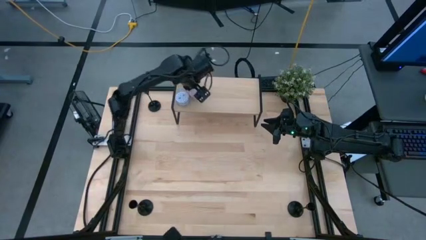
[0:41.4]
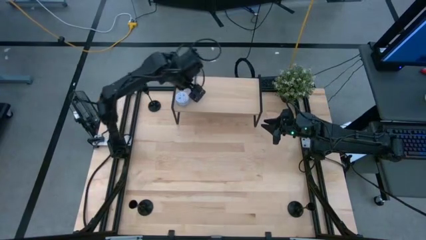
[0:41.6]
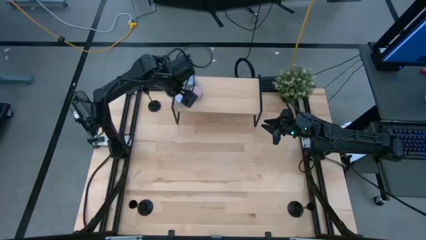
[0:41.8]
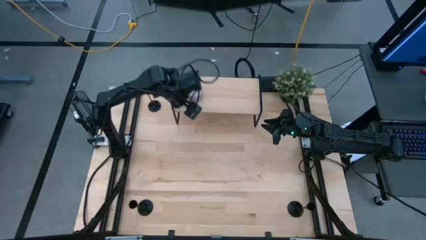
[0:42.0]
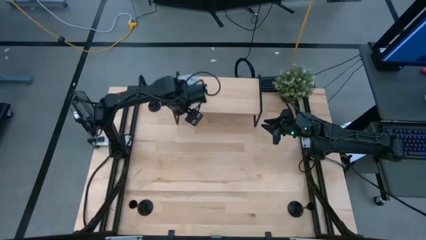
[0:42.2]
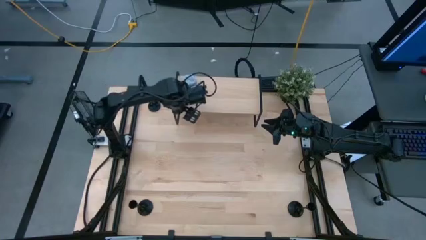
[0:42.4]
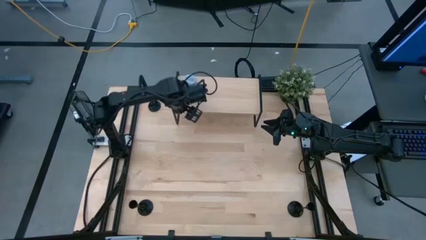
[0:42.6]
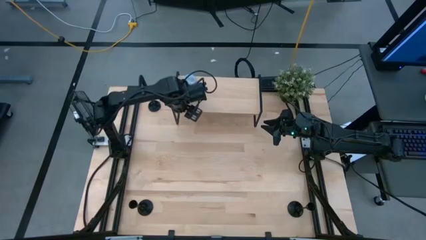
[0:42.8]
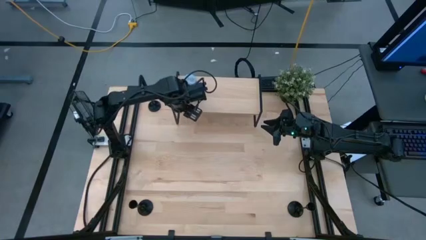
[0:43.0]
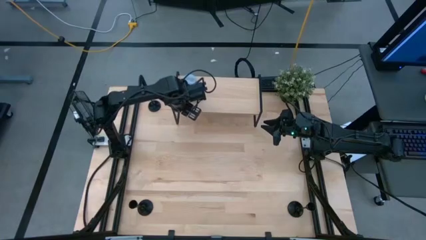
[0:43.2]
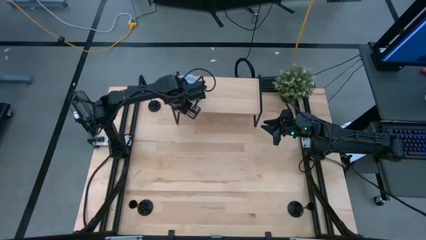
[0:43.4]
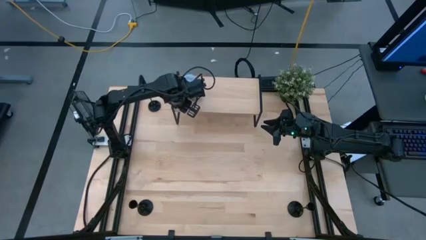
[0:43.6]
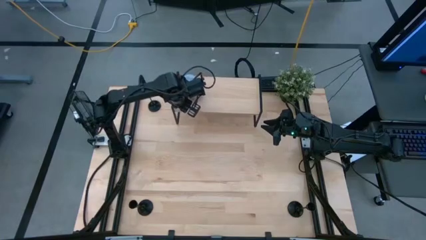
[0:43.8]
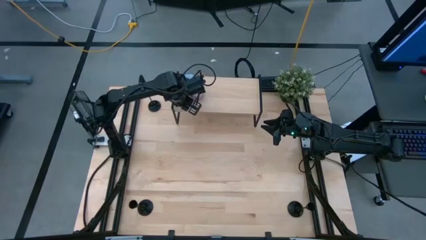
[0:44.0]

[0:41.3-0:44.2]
Task: Pick & Place candle stick holders
Adjust the white scented candle on the shelf

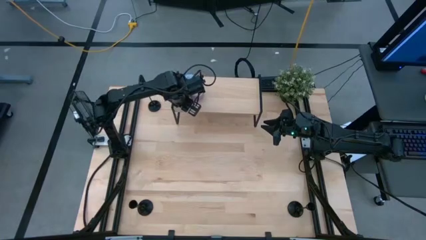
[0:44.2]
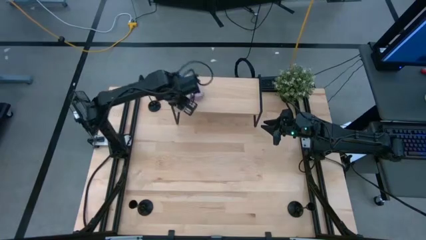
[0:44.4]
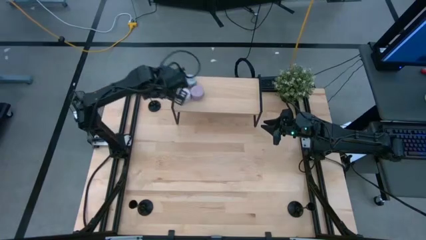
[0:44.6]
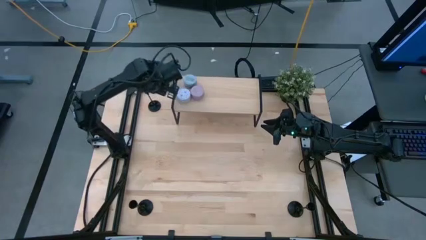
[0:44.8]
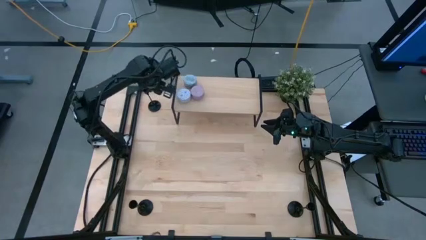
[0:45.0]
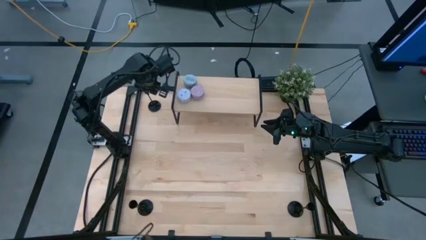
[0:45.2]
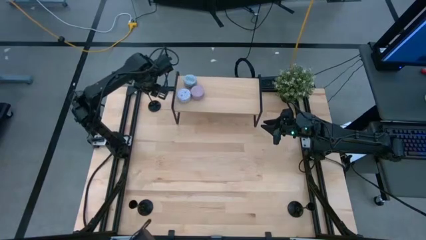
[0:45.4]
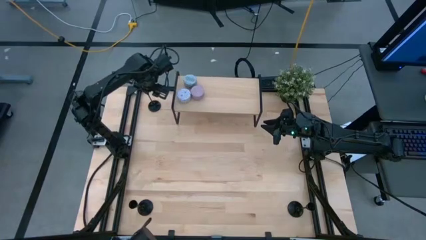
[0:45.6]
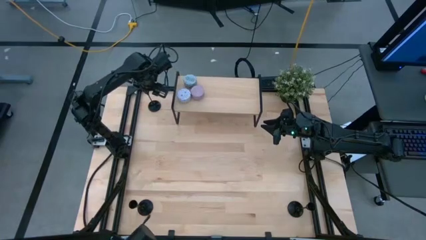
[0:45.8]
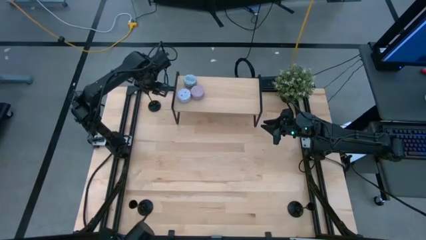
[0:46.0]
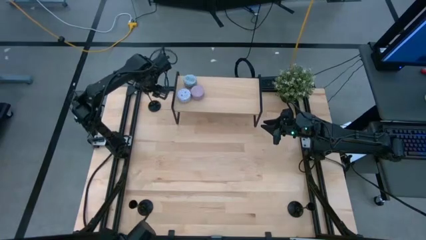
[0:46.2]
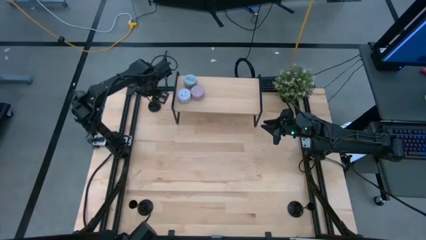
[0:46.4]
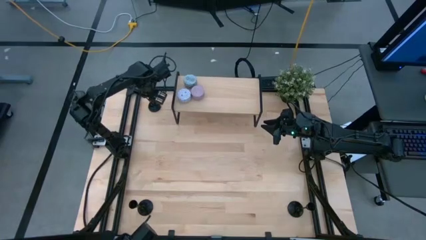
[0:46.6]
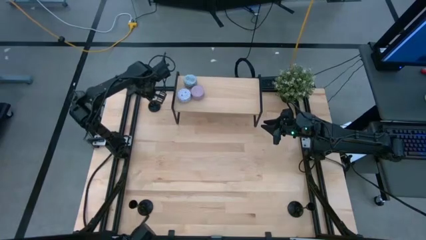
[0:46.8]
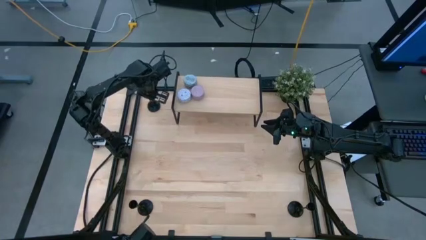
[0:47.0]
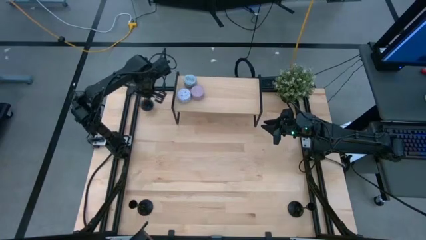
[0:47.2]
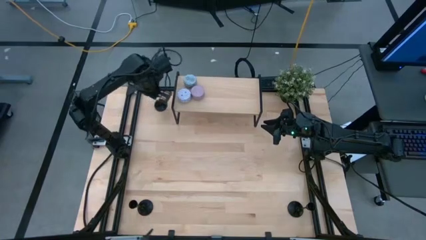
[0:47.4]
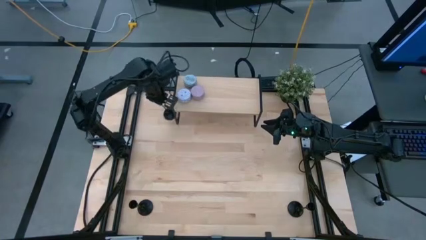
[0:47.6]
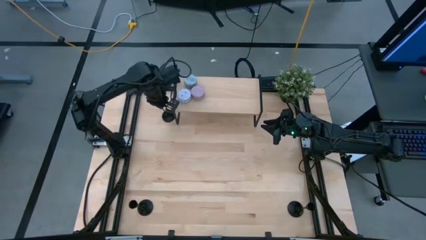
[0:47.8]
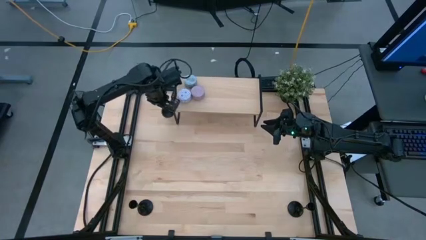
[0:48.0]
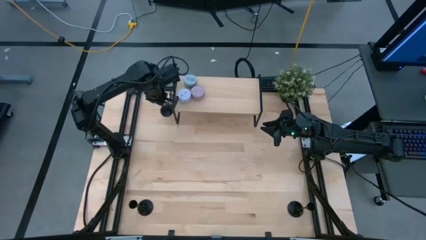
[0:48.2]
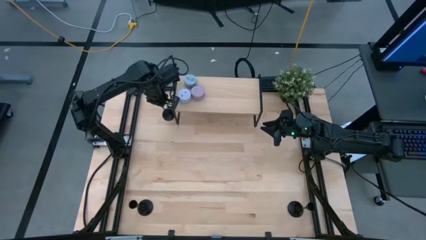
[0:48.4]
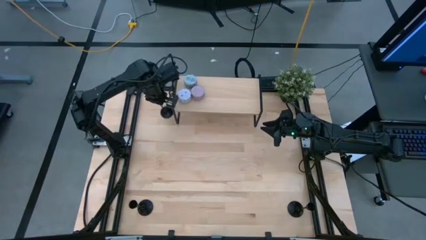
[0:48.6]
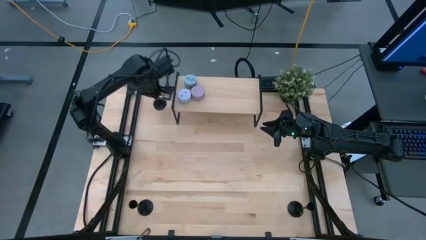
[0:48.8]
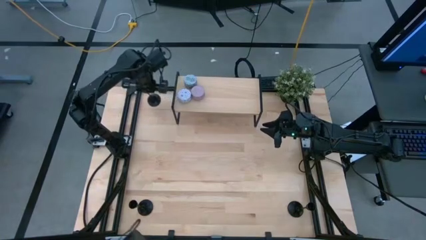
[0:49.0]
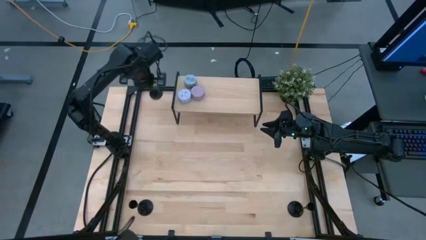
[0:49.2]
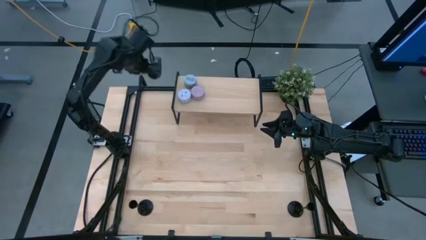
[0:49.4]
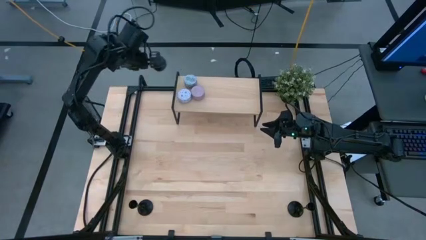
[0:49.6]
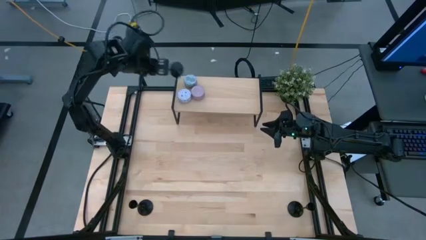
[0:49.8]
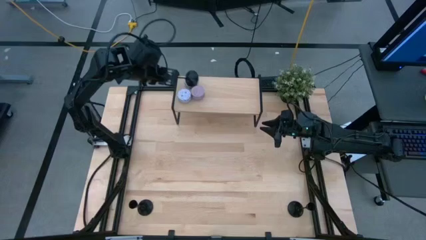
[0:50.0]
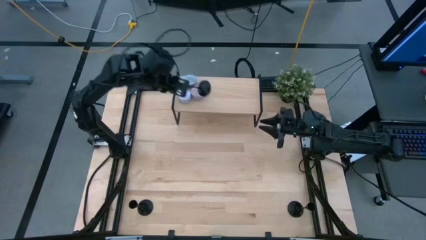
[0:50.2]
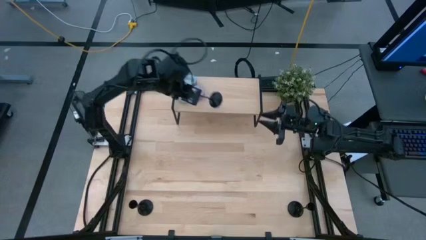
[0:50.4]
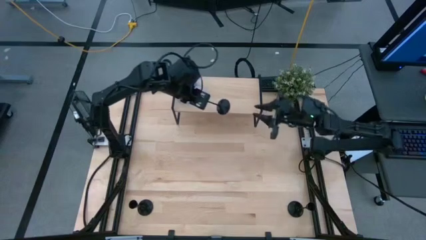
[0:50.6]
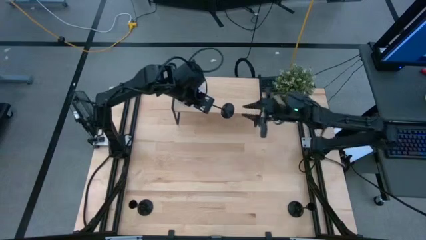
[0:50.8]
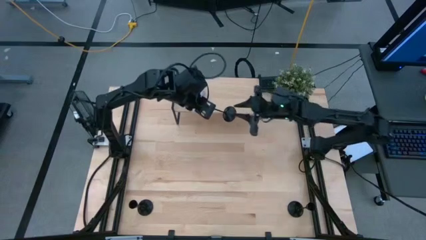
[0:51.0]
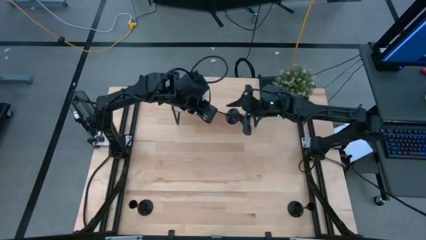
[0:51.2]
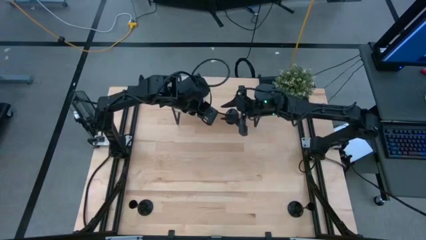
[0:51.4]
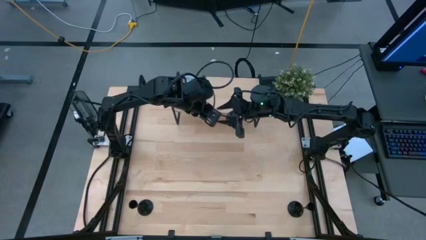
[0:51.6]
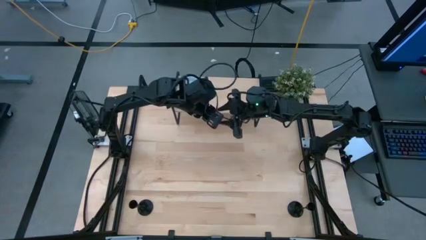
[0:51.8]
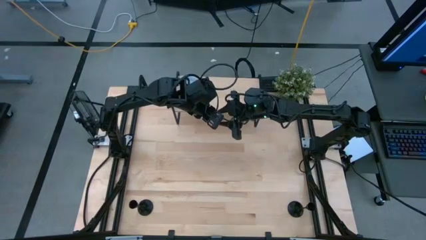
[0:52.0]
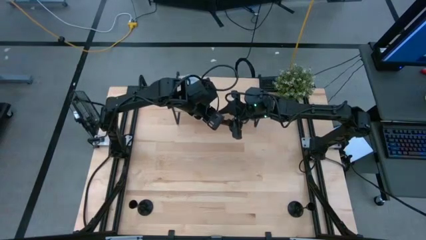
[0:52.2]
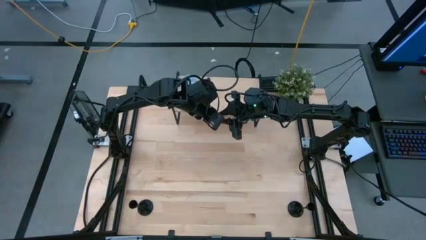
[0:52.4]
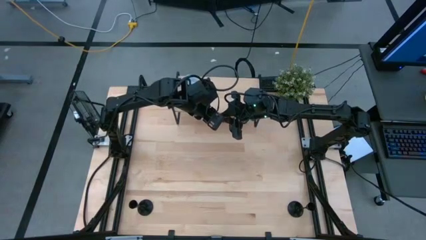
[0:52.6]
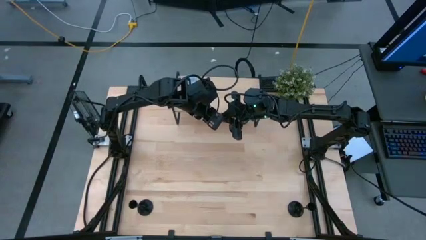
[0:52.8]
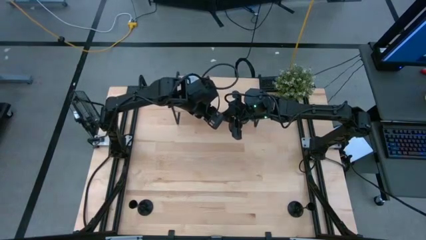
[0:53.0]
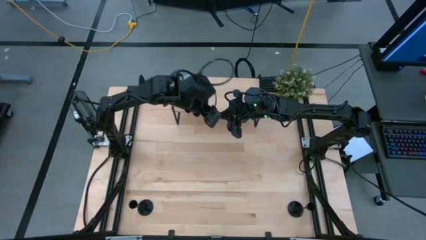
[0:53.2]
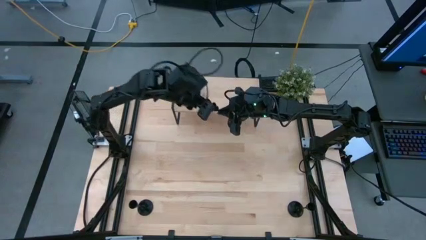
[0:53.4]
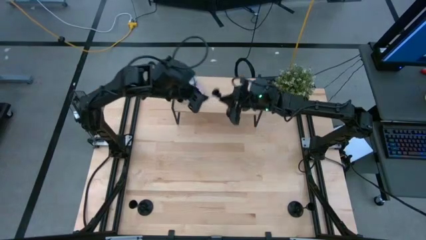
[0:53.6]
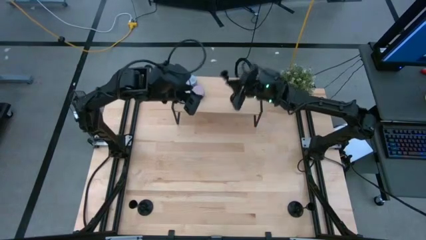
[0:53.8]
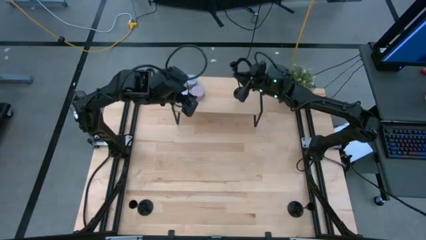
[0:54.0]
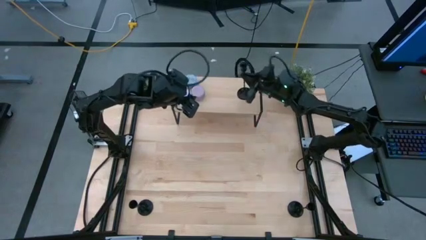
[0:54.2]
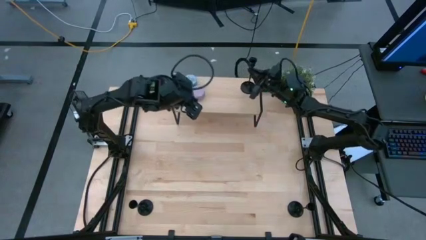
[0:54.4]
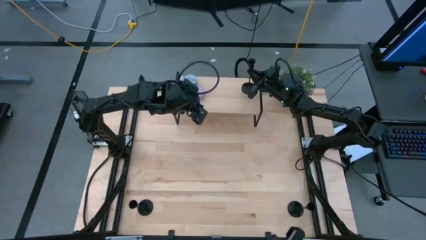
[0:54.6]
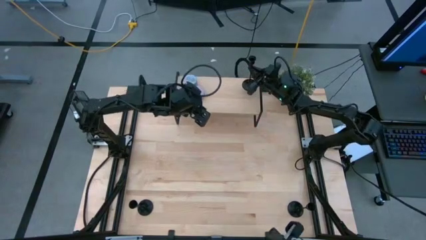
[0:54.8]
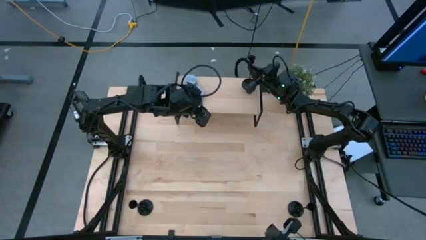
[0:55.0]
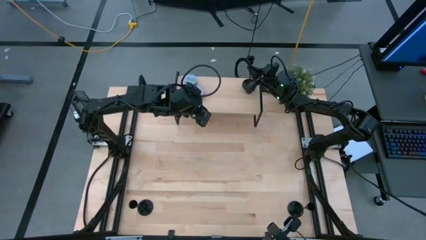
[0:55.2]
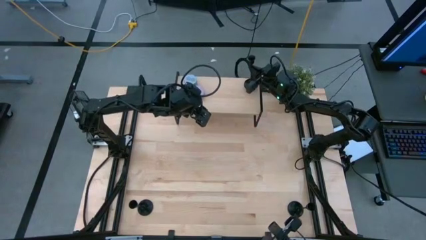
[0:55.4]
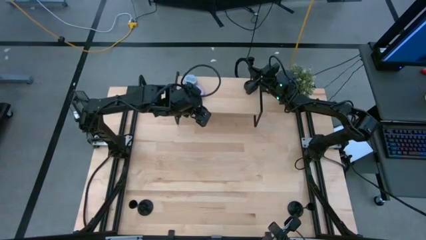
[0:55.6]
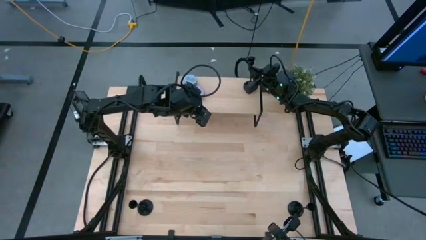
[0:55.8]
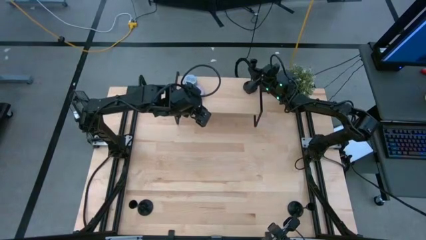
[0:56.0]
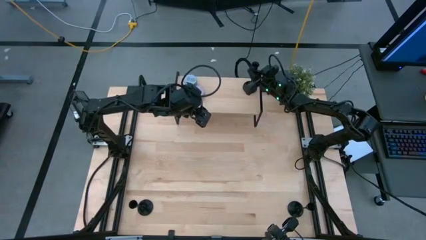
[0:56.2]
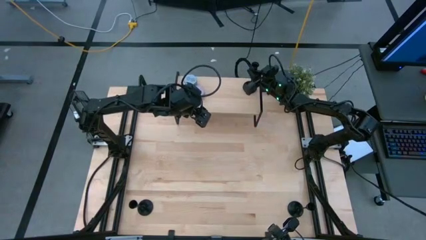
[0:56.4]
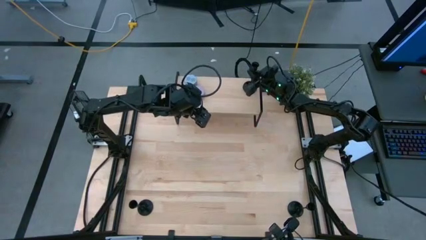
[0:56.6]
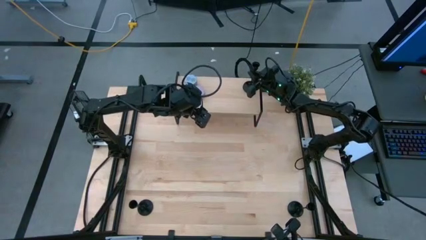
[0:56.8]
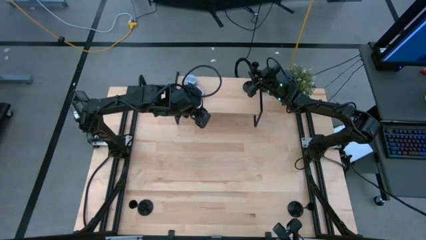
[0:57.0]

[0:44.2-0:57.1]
Put the top black candle holder on the shelf
